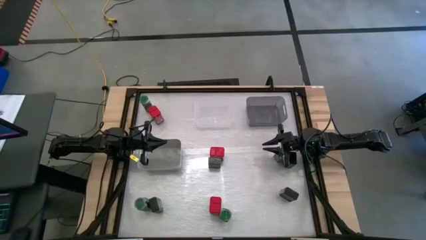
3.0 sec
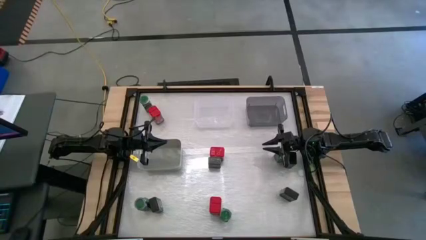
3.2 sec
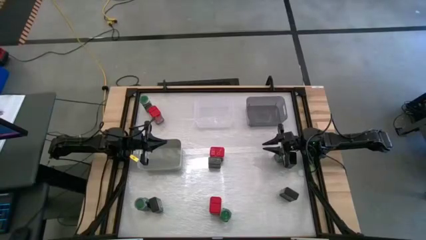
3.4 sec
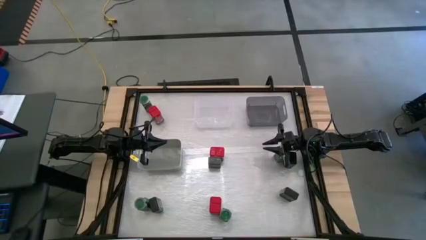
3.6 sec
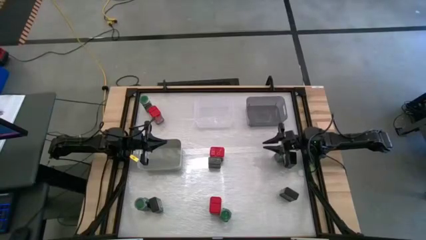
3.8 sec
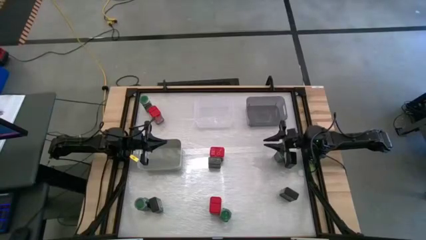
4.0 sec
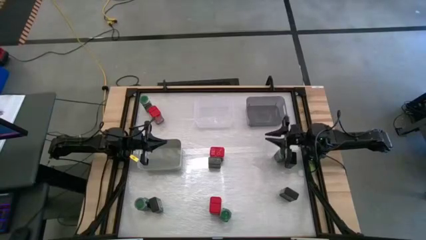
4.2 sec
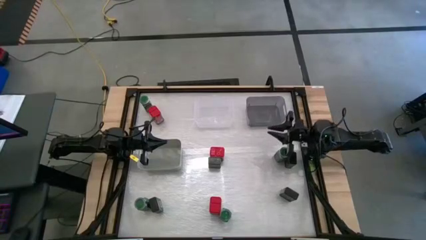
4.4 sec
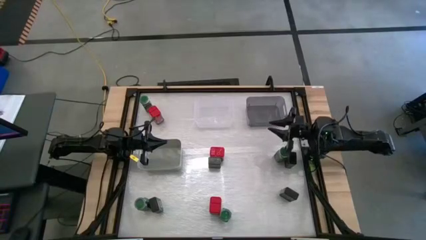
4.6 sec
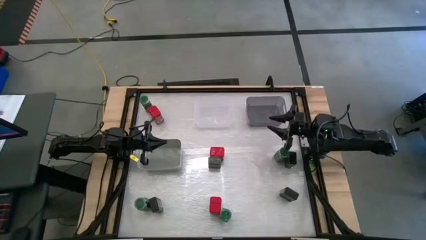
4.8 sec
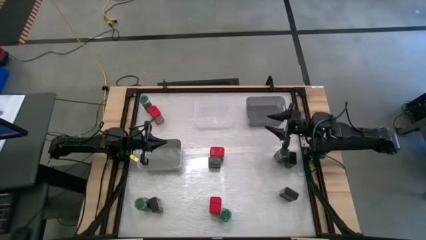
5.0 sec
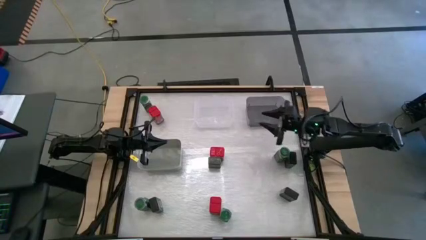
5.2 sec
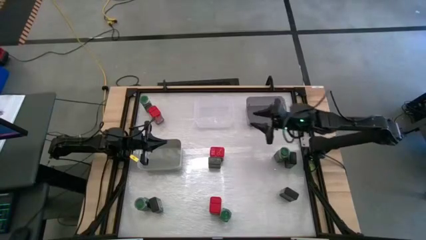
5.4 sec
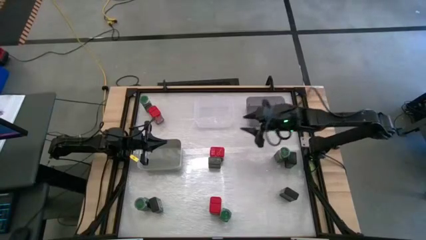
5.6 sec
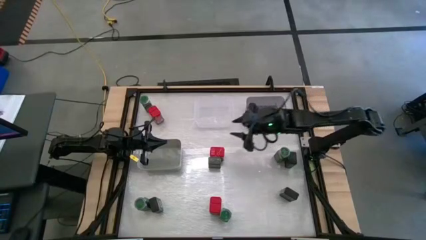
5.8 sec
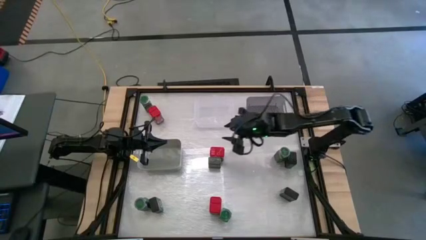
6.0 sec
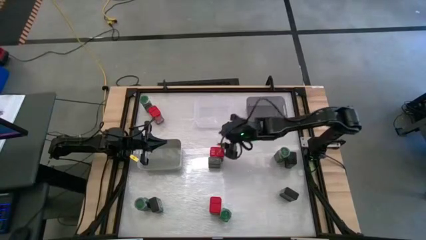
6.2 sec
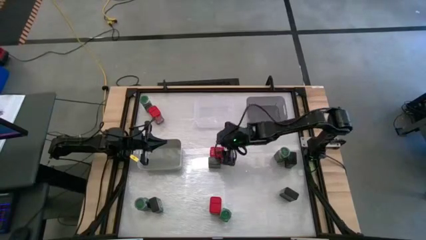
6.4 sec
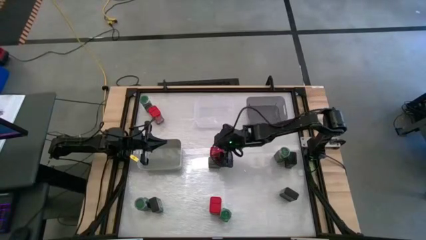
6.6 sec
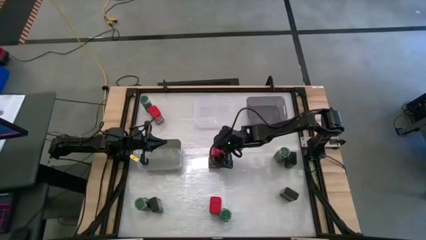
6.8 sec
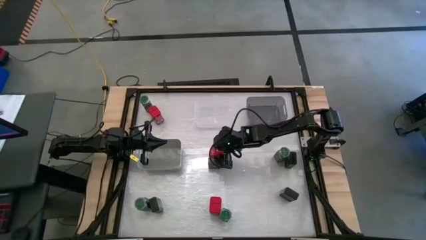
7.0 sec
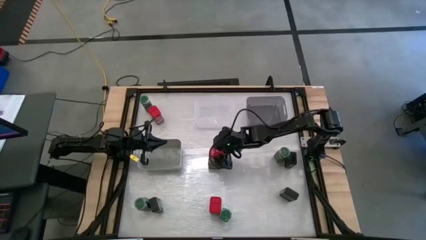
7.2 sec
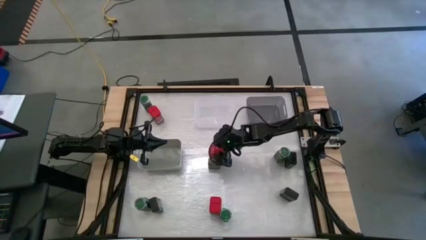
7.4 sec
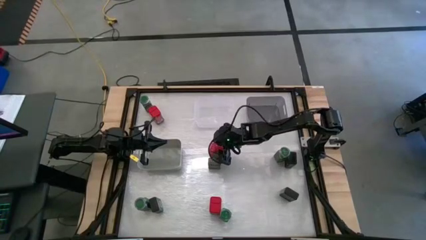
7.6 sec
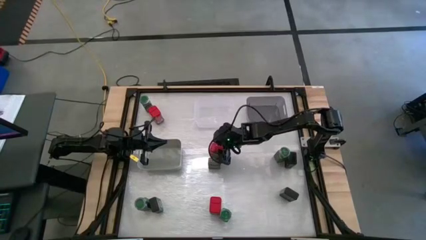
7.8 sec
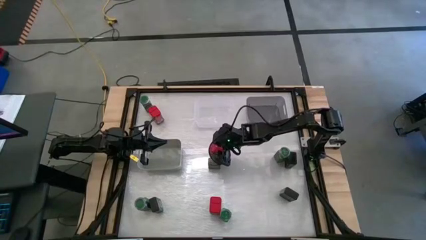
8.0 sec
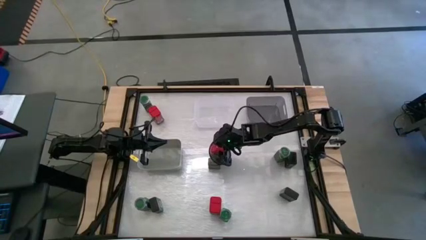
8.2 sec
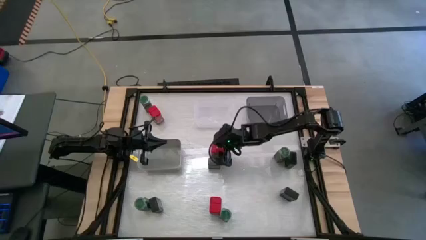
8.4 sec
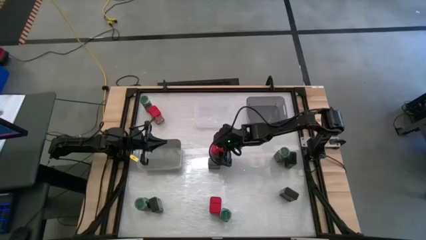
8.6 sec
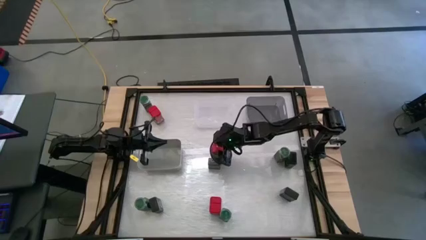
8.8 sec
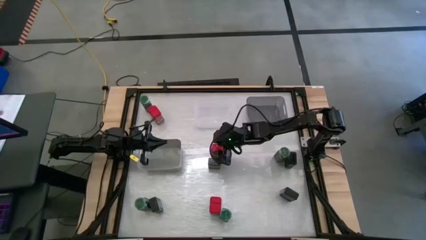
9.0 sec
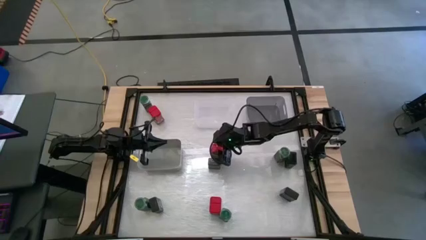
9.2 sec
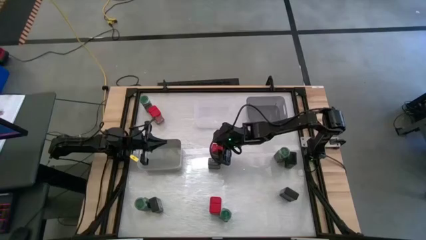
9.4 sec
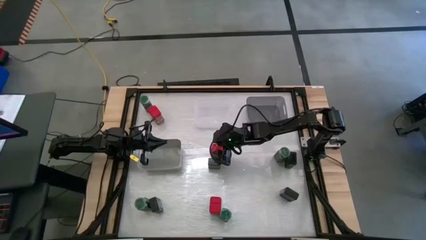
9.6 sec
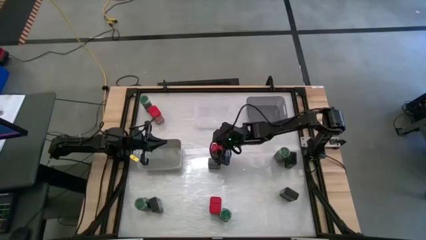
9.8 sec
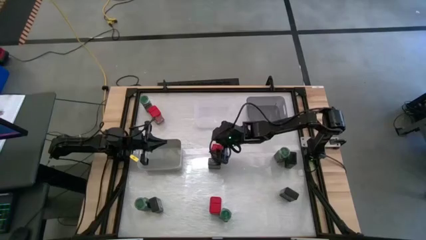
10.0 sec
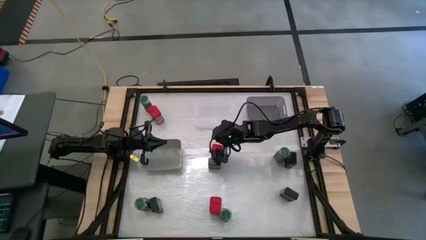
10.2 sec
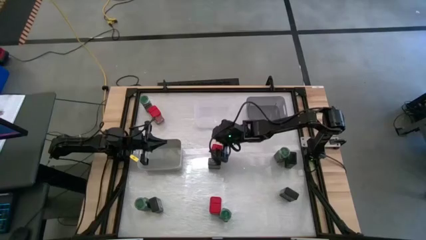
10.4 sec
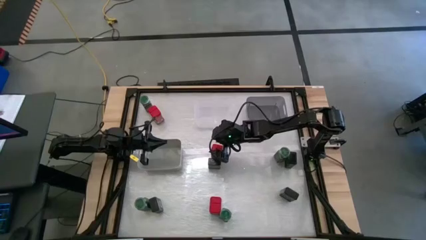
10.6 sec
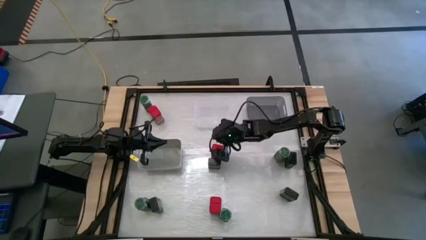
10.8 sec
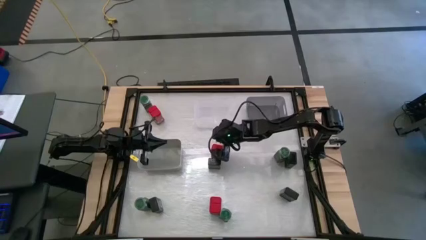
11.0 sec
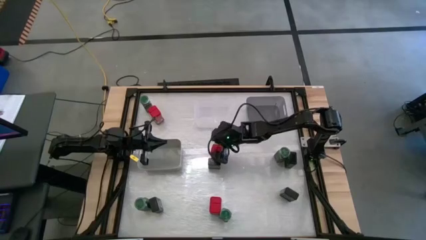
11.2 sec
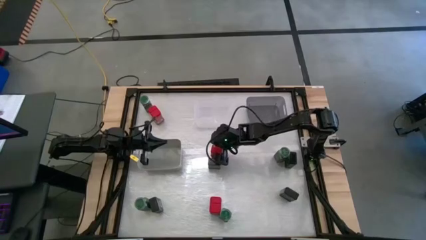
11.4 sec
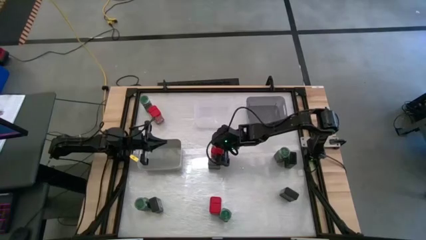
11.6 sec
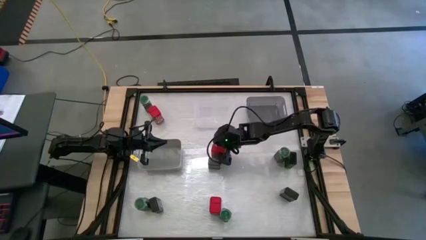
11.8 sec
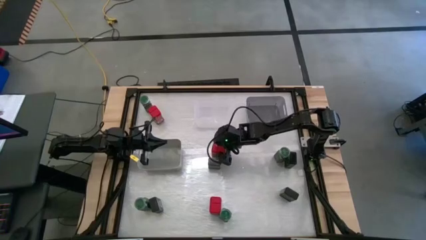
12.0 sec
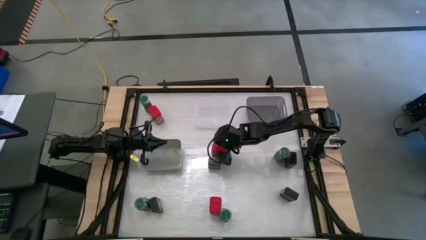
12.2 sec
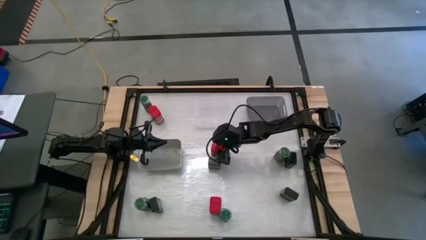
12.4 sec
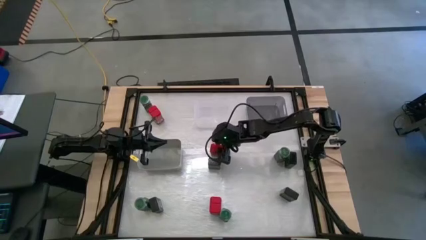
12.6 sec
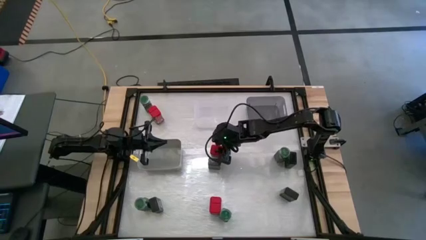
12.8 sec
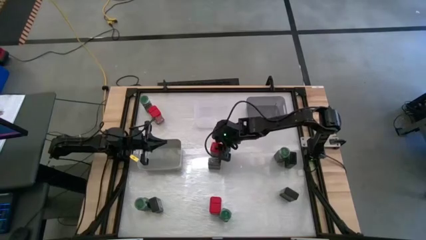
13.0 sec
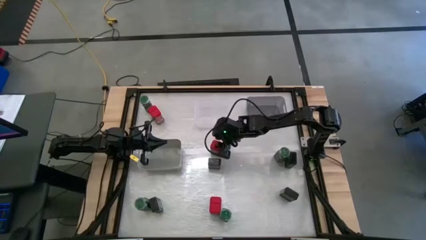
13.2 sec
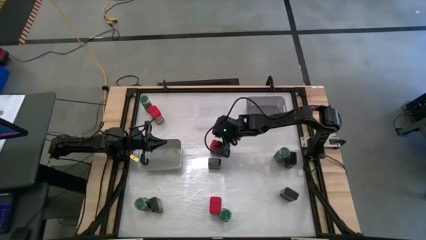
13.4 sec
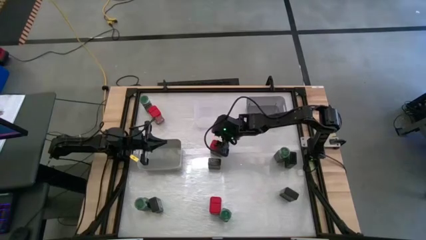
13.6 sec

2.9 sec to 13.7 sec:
Task: Sort spices by type
Put the red seasoning can into the transparent bin
